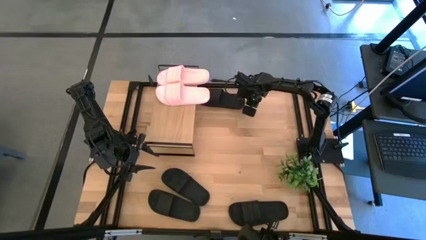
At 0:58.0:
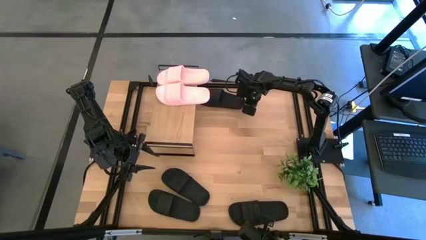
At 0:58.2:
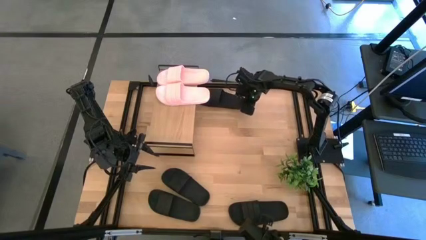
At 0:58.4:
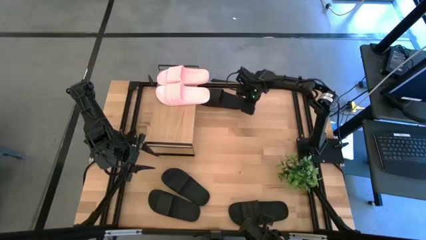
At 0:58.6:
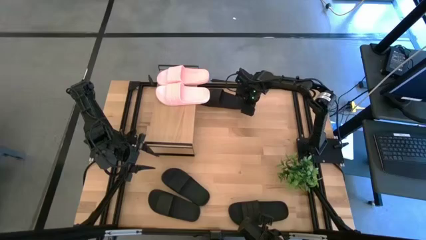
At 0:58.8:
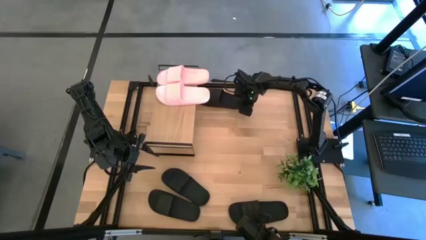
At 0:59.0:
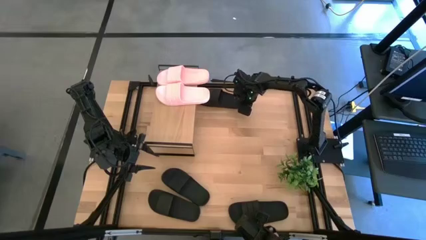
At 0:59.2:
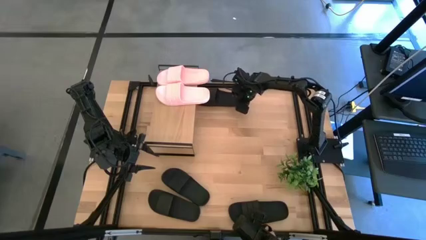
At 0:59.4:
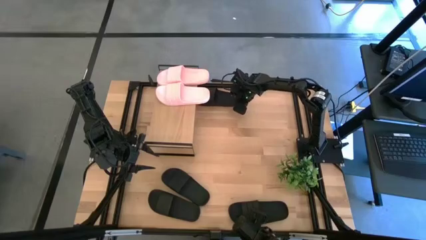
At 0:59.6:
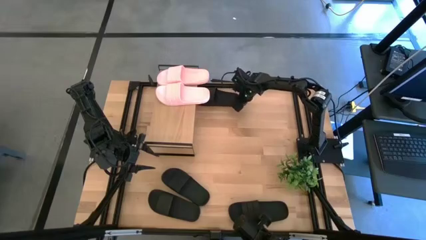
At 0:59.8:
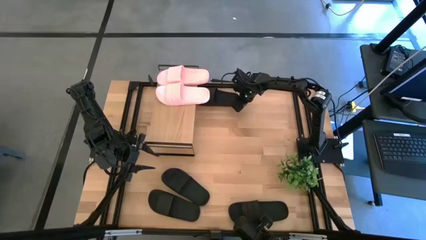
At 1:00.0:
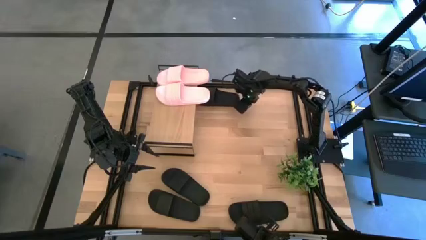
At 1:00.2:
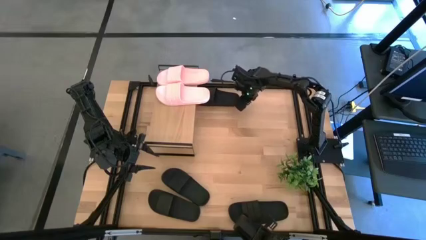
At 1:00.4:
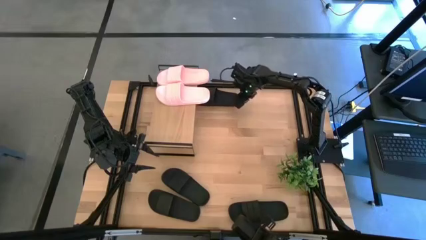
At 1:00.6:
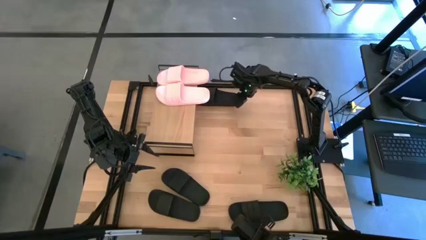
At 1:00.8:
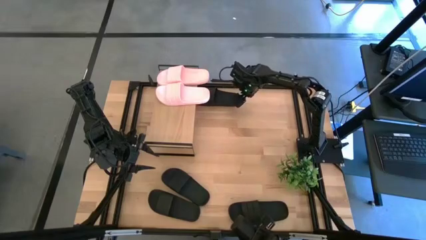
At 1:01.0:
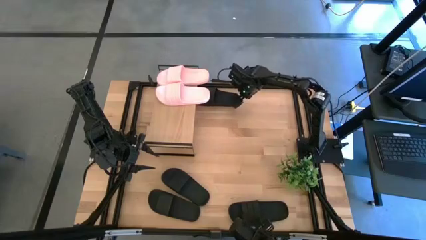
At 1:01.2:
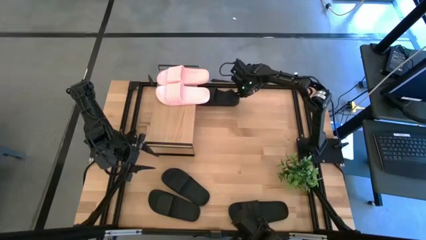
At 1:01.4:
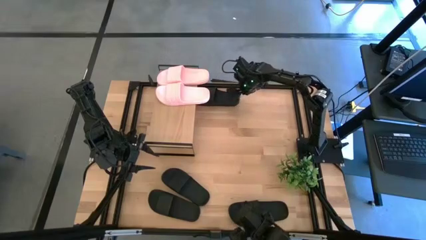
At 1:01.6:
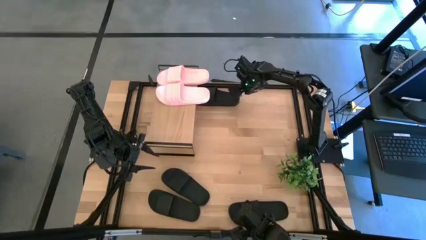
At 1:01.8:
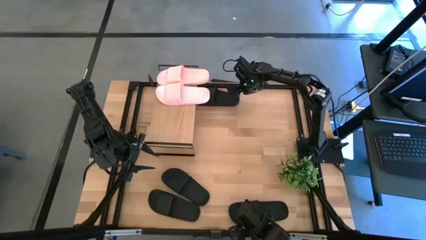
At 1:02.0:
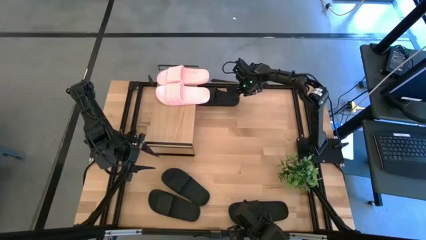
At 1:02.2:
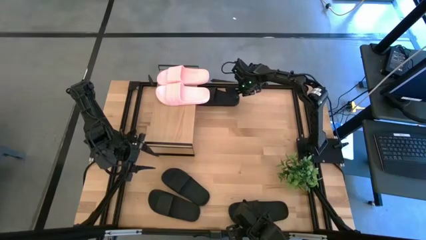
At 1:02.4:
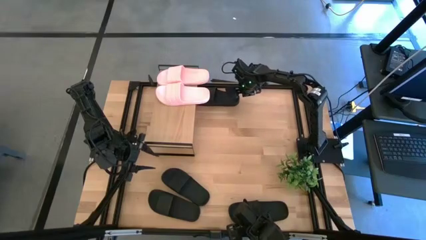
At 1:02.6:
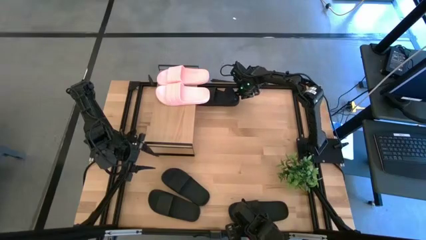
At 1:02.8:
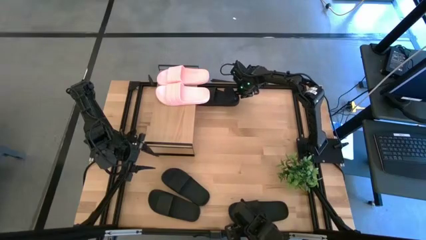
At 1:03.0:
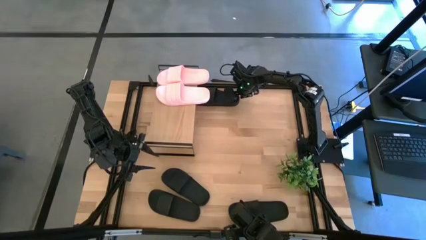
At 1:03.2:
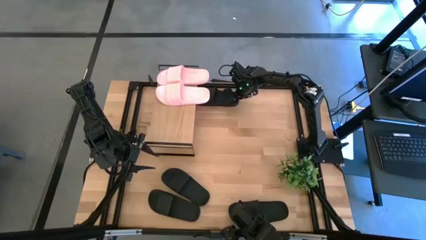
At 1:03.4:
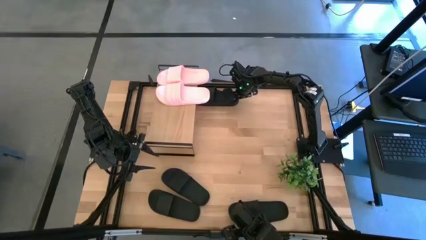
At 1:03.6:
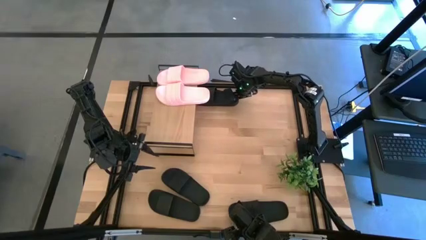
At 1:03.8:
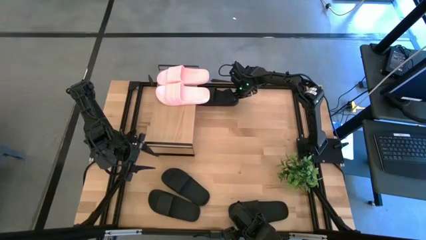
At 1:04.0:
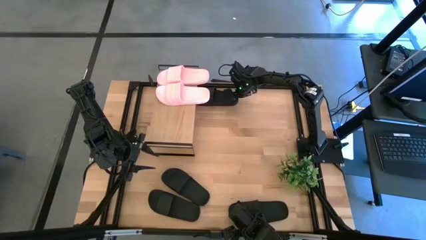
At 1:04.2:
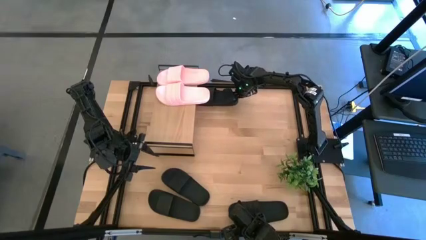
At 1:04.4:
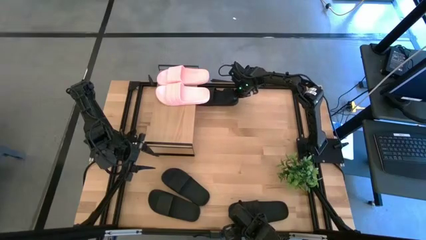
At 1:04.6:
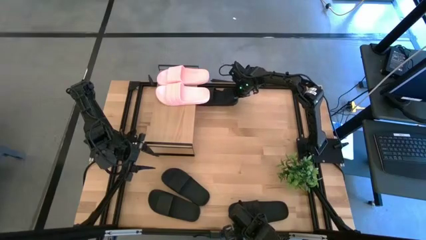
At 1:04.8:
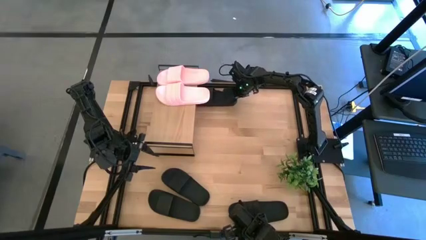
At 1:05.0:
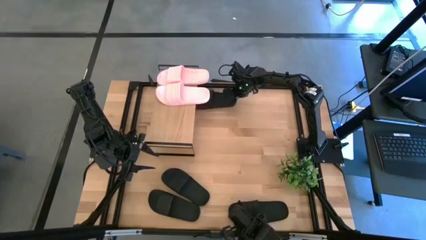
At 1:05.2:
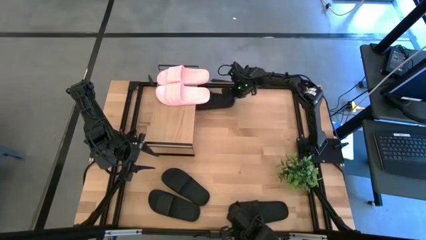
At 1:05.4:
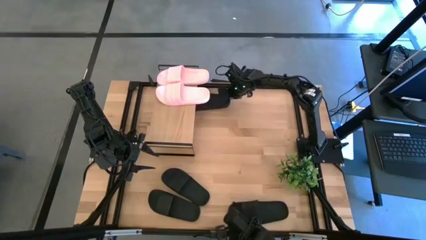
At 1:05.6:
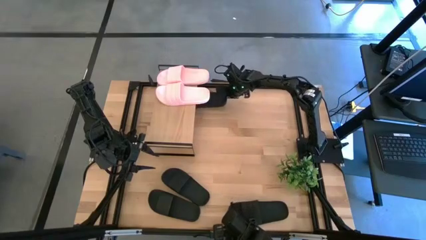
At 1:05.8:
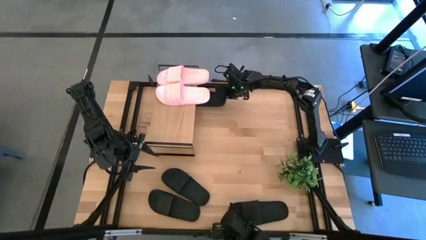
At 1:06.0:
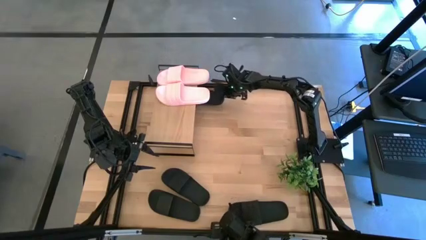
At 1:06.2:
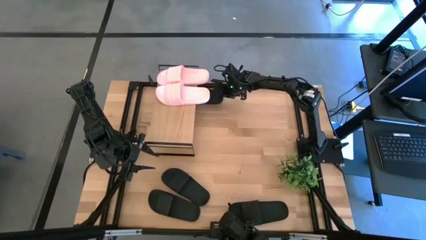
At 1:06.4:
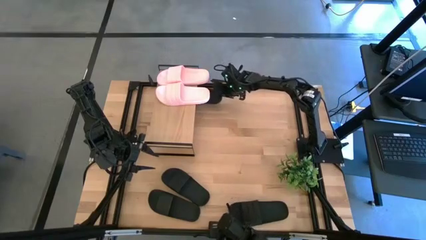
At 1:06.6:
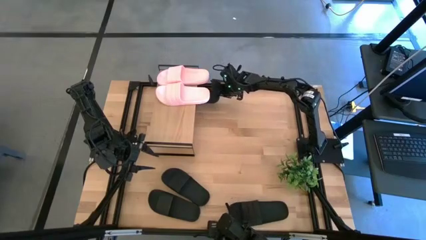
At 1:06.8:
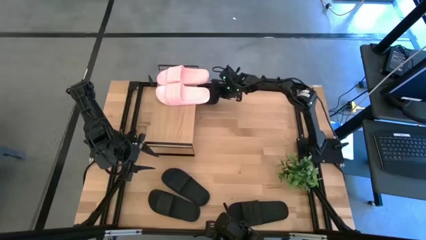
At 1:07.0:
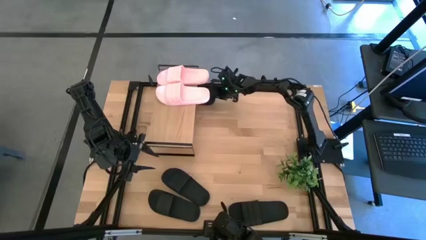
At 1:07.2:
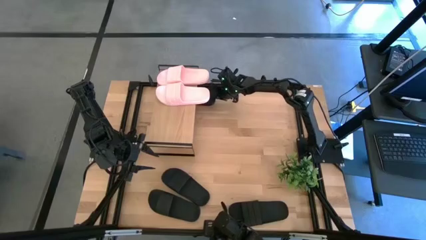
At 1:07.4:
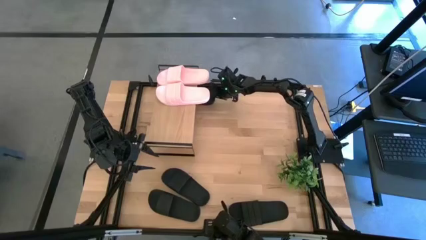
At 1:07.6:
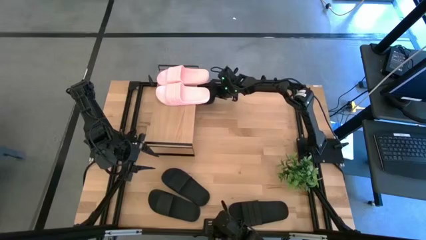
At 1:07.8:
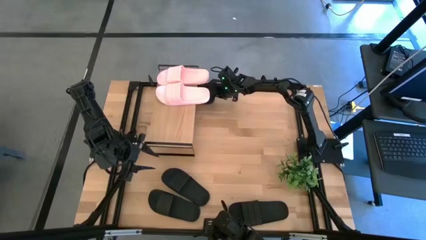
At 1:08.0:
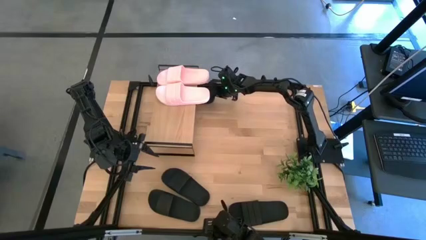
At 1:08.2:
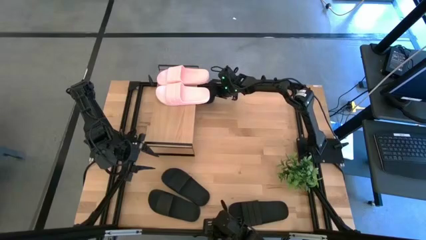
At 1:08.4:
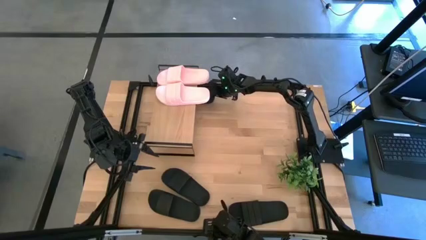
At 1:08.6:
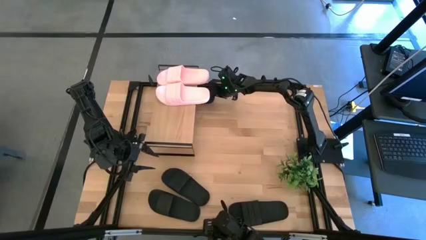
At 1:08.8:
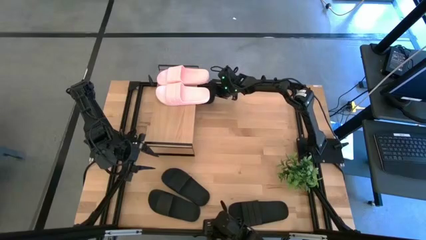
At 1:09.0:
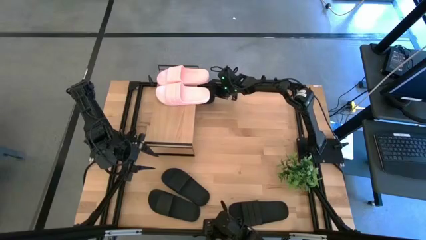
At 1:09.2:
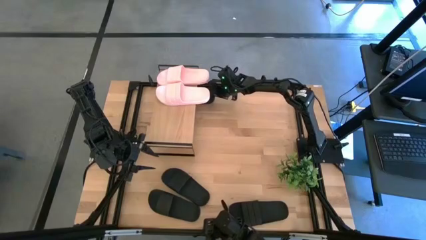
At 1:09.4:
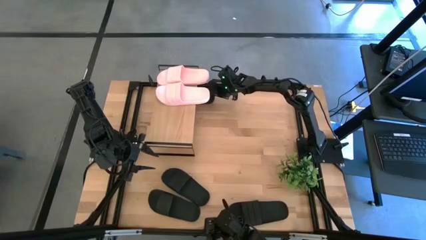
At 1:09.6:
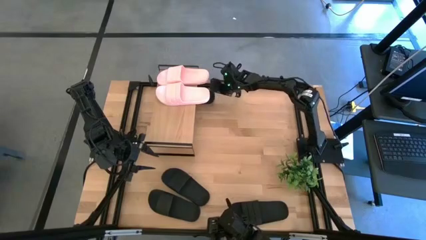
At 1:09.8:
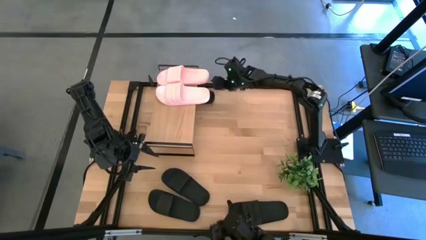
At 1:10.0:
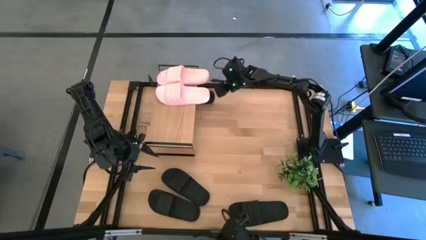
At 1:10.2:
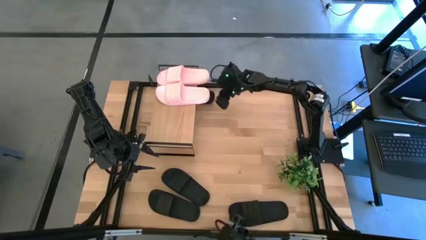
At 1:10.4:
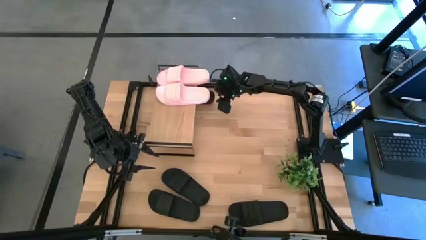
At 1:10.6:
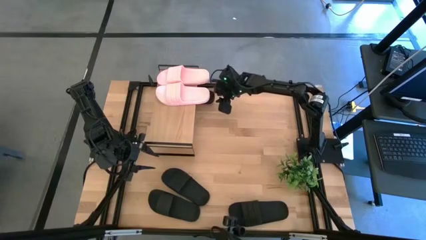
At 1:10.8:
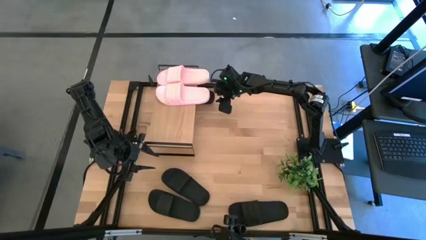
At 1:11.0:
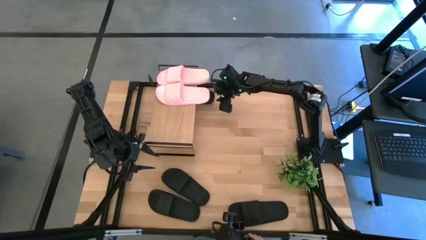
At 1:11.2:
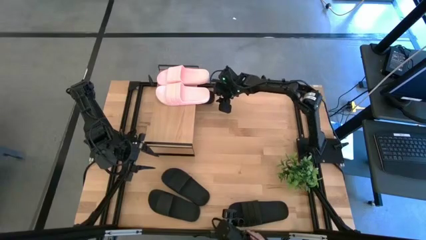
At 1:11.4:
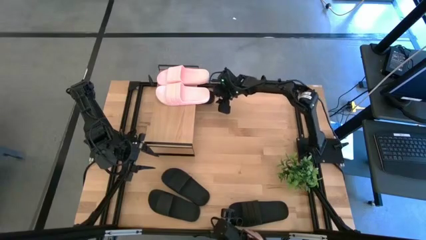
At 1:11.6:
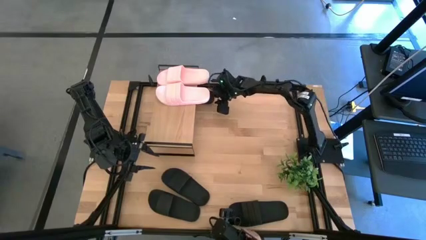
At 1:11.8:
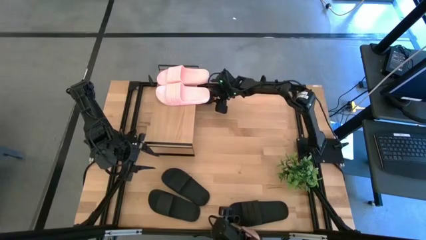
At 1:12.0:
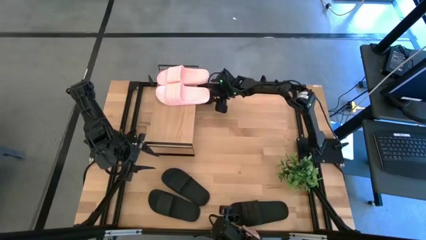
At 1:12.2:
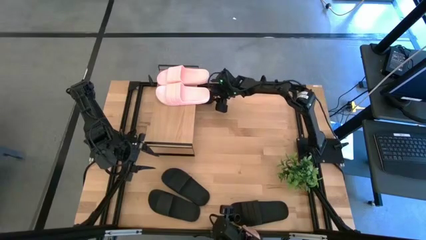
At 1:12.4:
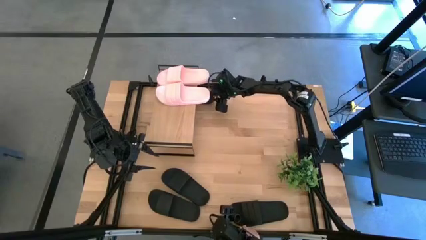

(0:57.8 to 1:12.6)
Task: Pick and place slides into the shelf
Put the top right black slide under the shelf
